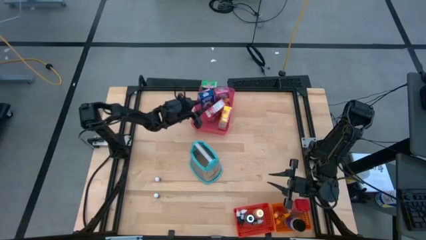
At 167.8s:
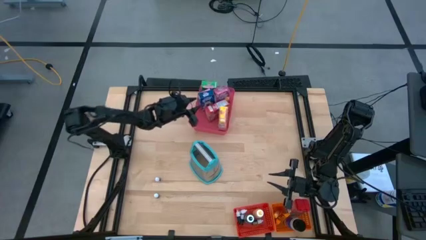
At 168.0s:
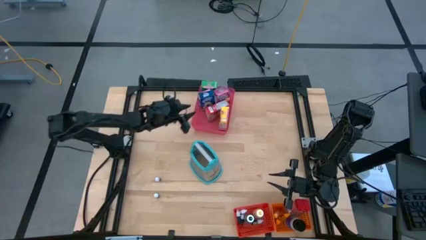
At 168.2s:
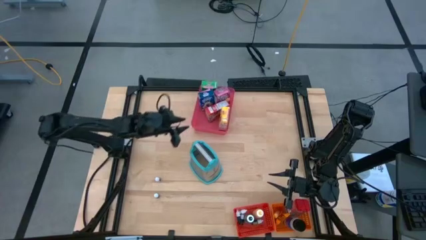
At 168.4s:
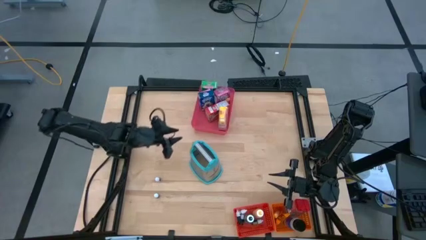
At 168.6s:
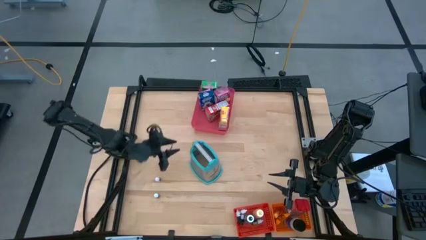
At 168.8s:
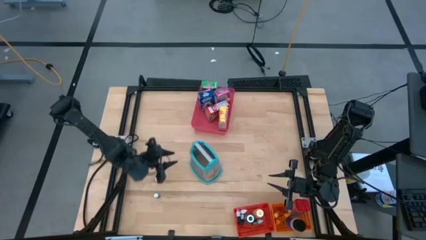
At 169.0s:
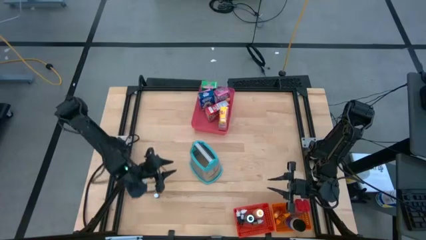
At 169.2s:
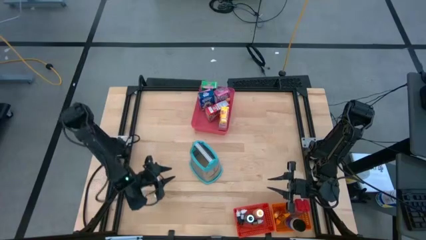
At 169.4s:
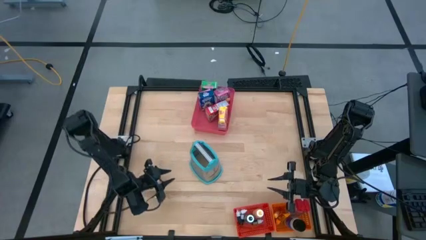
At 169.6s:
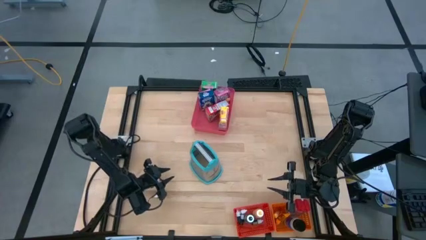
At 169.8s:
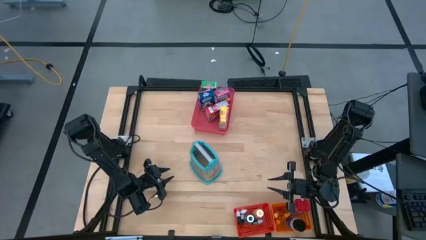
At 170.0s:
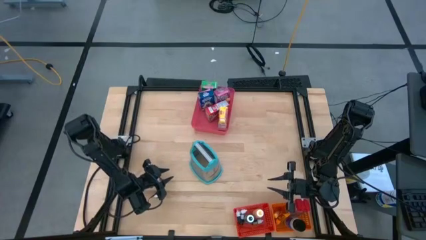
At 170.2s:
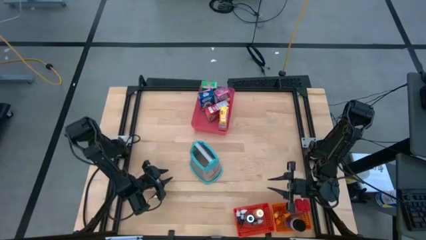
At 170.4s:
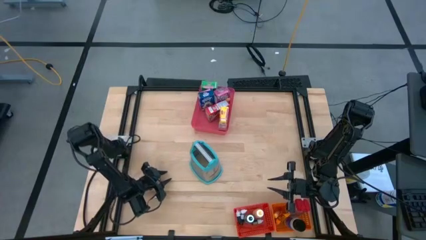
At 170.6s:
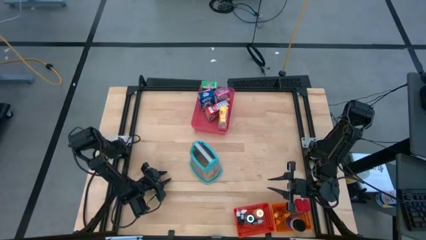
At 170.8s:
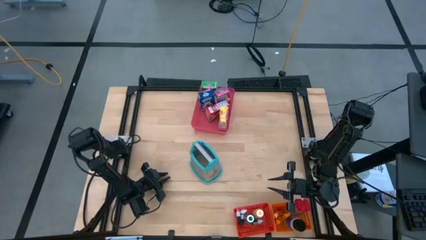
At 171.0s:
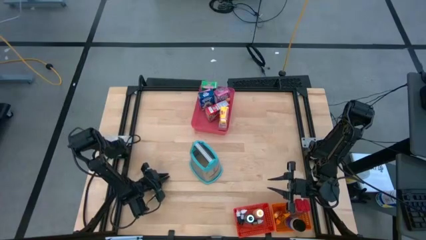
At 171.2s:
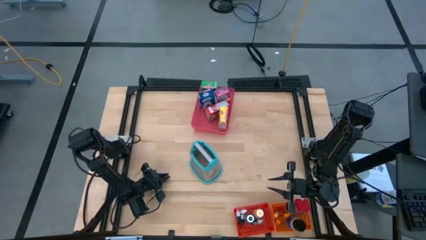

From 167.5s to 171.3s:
Task: Pick & Place Kitchen Items
Put the blue food coloring bottle into the red bin

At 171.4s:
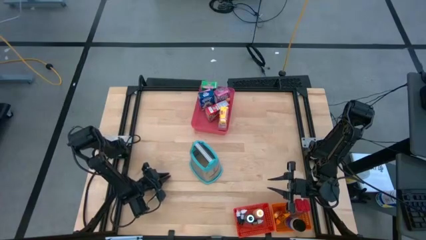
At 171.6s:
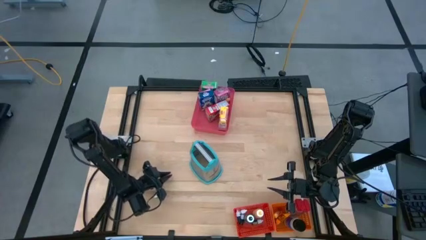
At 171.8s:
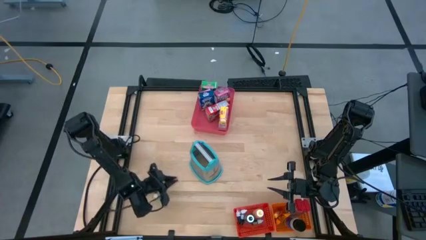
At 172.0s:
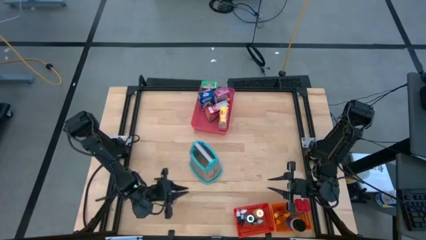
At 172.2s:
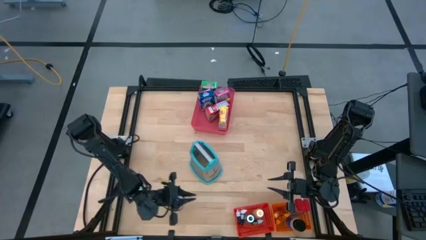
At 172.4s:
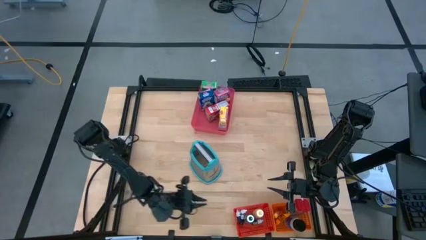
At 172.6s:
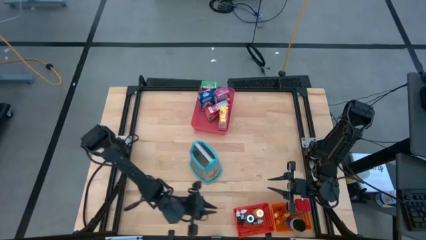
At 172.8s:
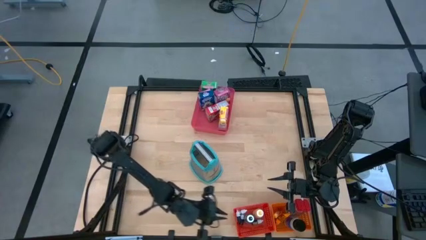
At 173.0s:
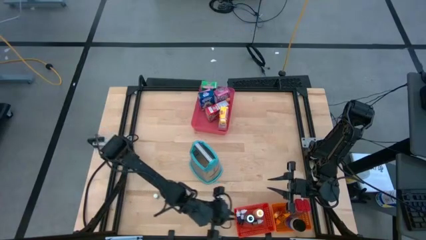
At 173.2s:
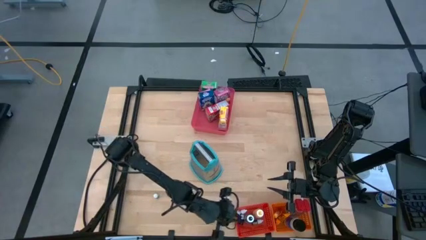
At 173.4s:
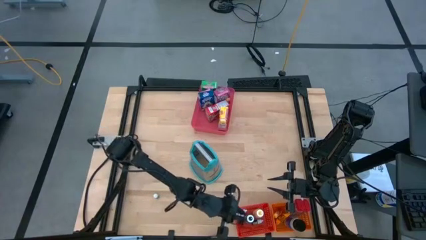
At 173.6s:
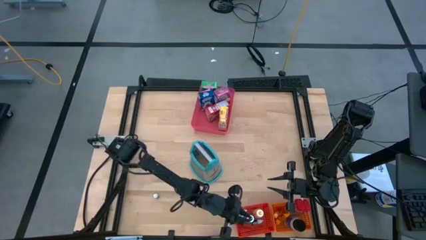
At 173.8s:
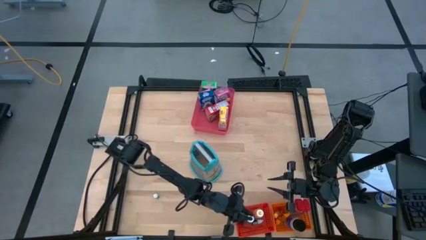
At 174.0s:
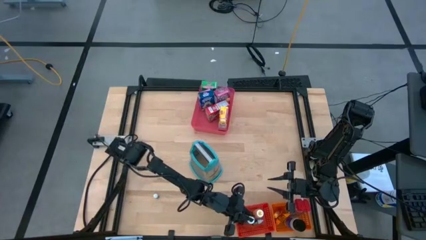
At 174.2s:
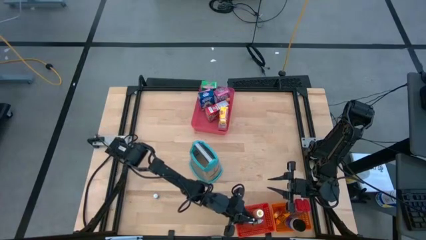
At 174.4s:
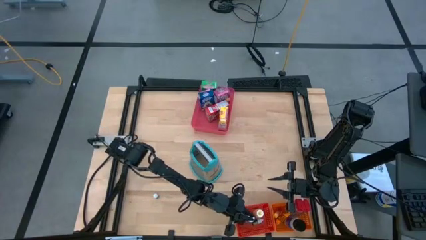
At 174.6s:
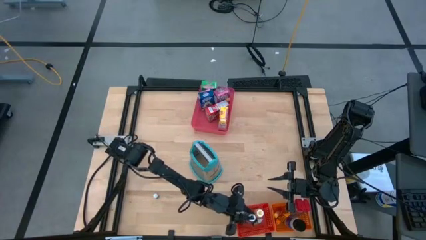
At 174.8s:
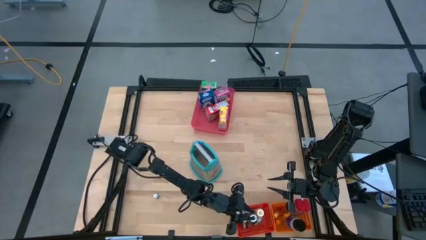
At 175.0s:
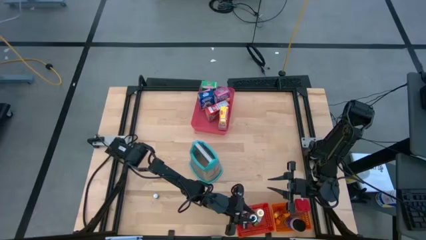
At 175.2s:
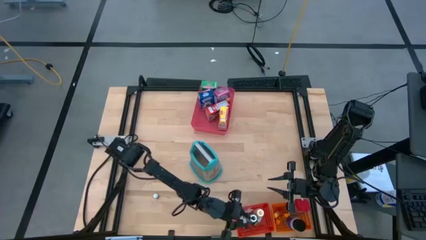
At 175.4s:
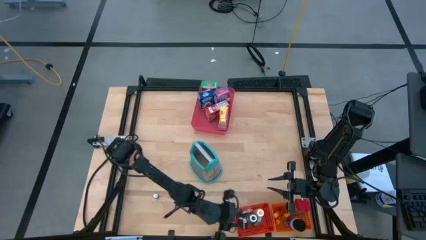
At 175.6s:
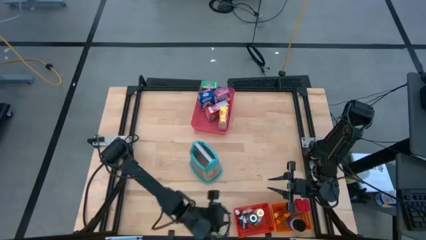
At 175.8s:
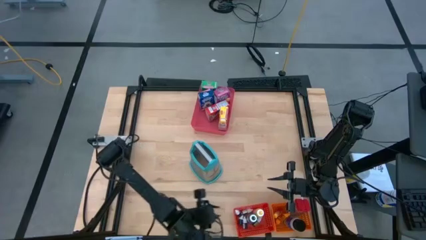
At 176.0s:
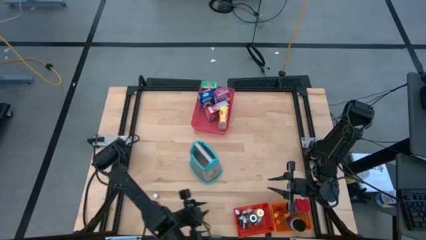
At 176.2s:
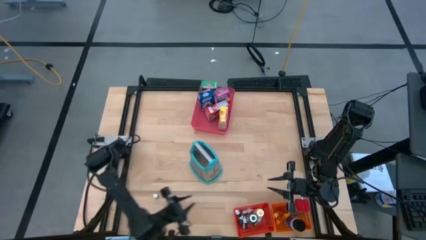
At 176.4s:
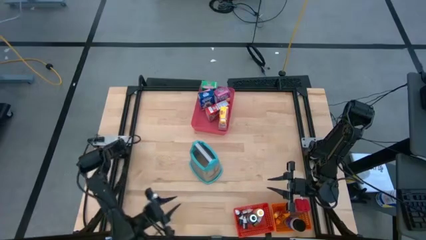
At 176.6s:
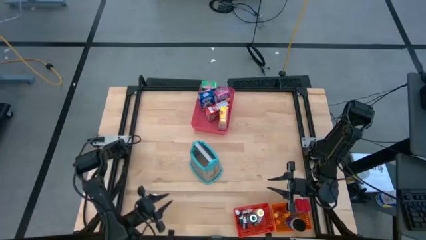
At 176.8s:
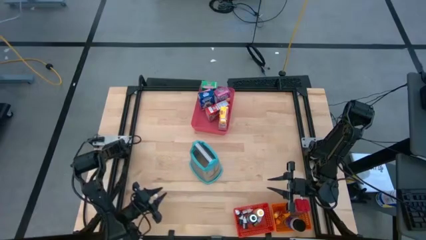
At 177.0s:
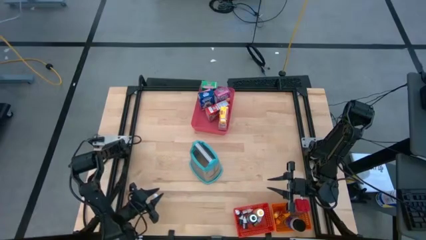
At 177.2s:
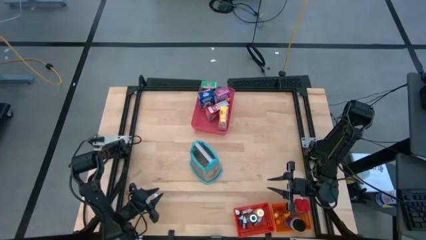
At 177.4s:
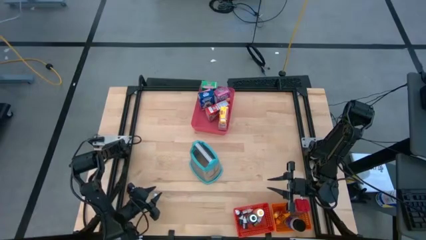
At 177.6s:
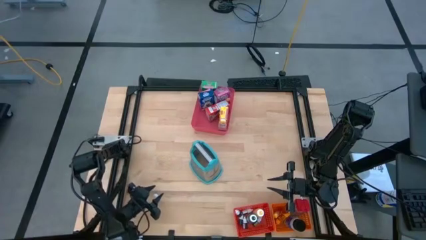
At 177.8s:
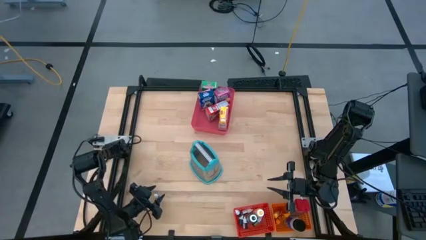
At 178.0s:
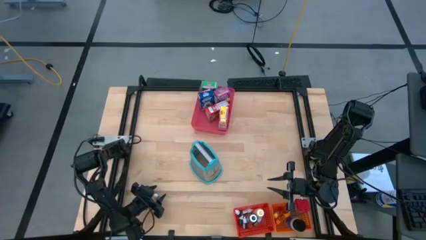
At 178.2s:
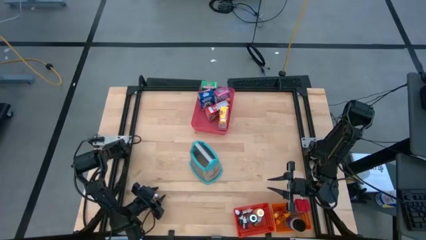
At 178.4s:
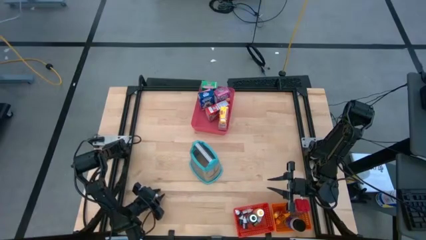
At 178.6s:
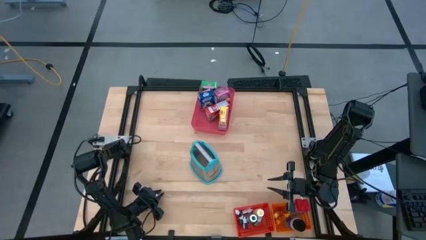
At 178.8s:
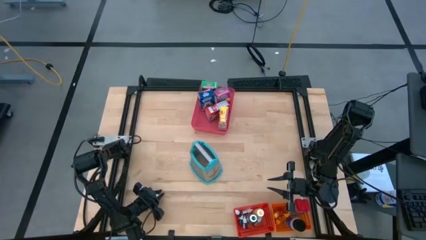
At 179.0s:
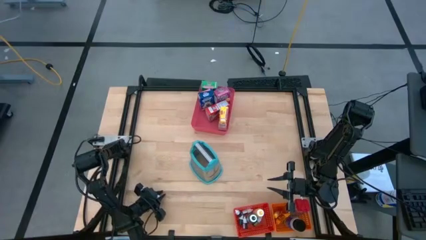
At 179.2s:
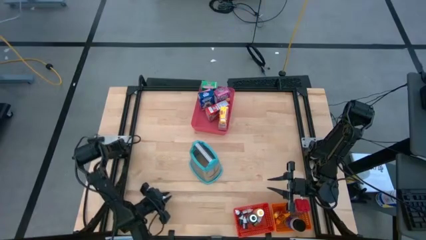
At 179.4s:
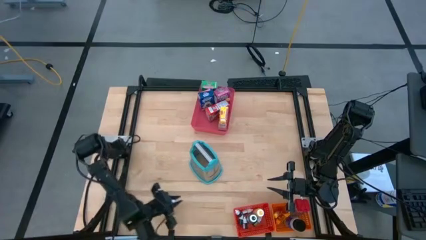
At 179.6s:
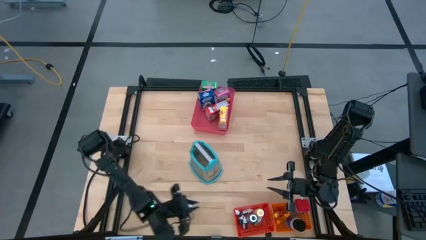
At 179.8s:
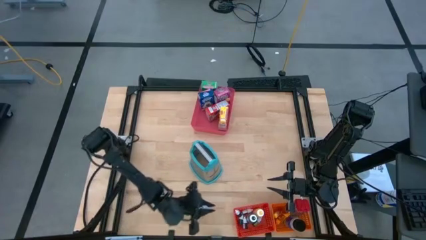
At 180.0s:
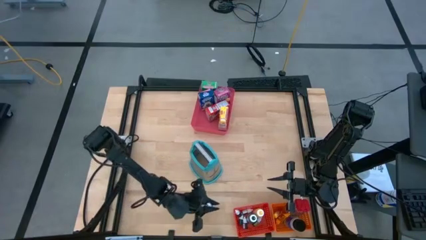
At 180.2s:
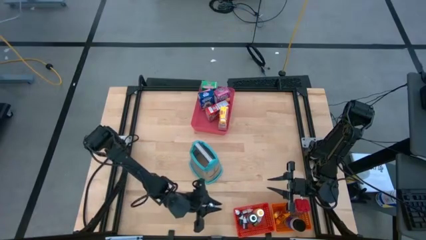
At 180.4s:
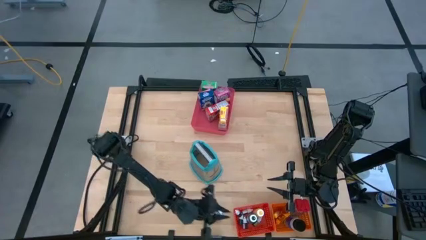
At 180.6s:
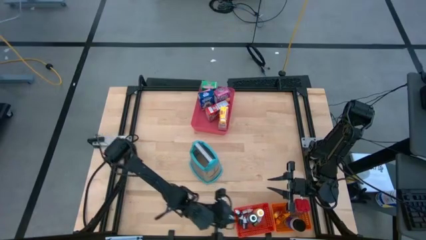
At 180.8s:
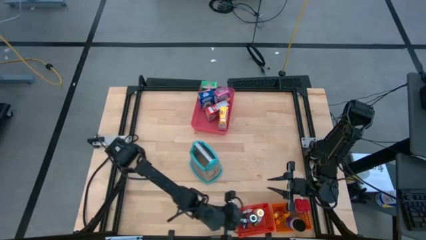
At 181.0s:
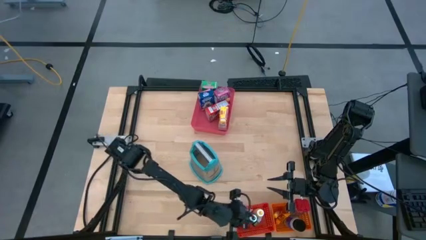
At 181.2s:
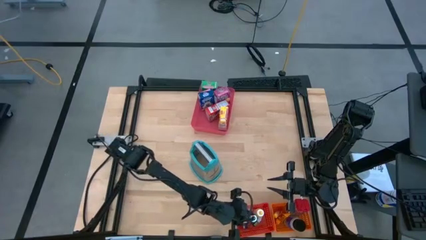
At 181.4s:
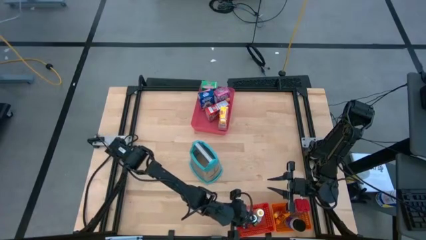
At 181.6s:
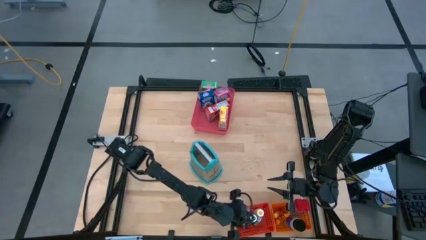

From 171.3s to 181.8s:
Put the blue food coloring bottle into the red bin
